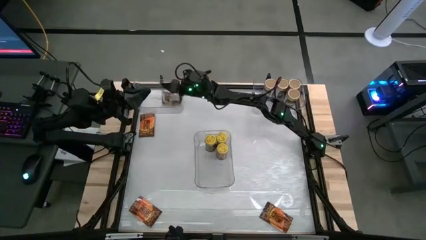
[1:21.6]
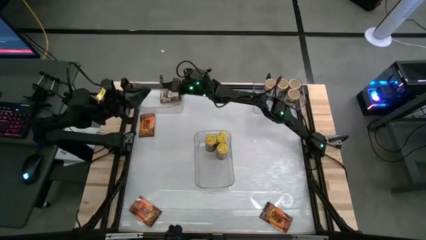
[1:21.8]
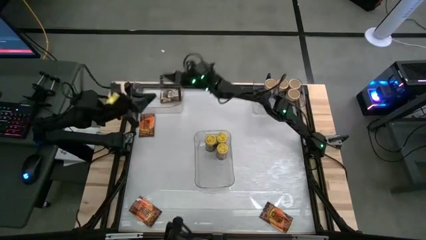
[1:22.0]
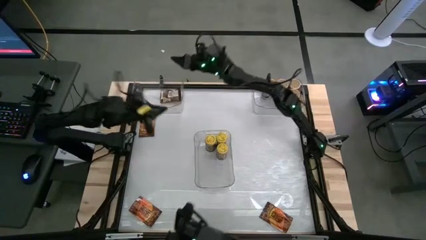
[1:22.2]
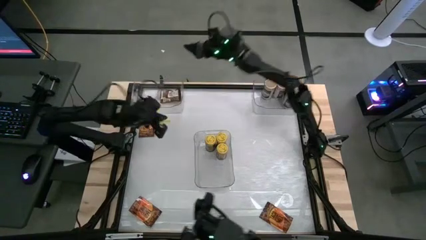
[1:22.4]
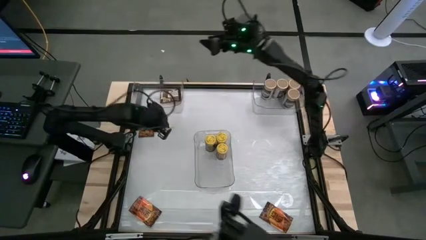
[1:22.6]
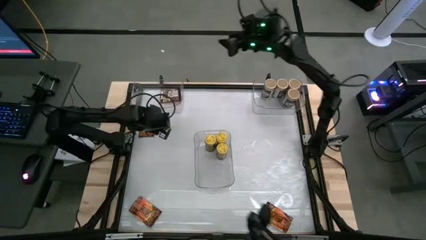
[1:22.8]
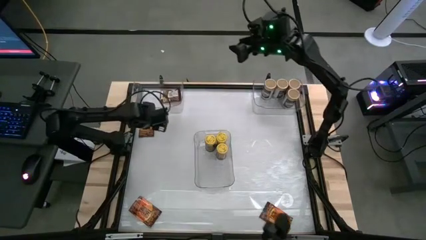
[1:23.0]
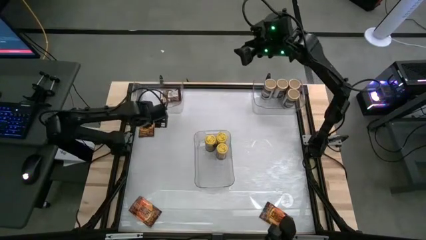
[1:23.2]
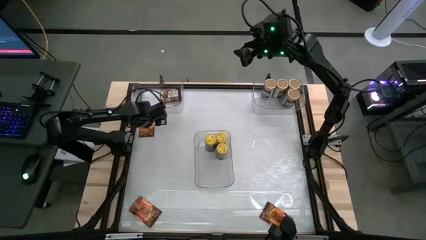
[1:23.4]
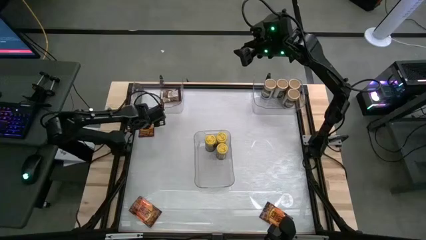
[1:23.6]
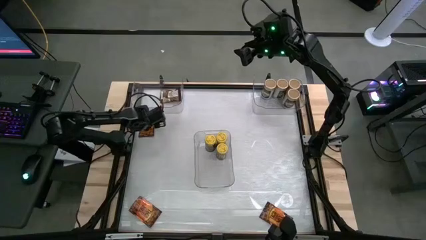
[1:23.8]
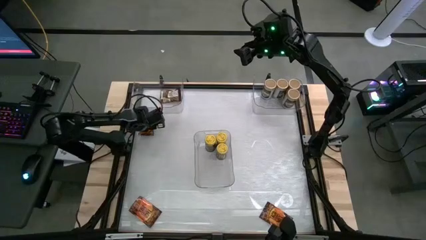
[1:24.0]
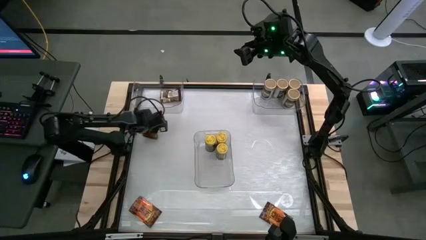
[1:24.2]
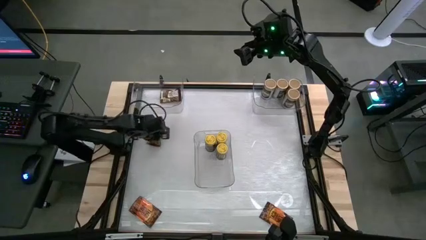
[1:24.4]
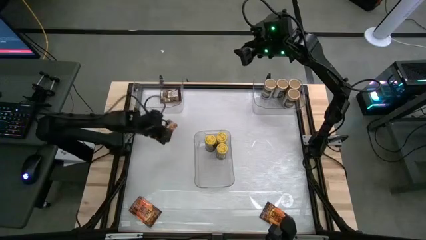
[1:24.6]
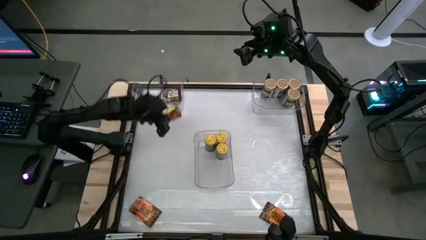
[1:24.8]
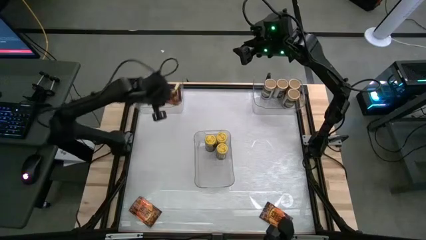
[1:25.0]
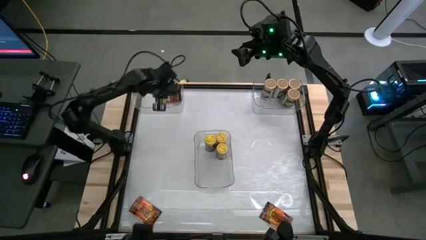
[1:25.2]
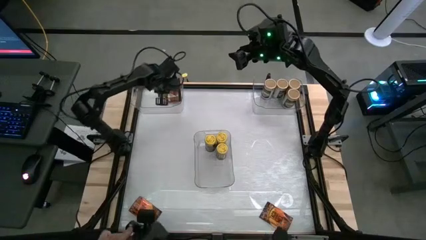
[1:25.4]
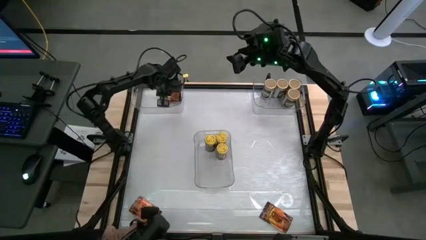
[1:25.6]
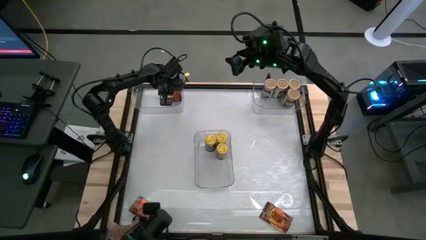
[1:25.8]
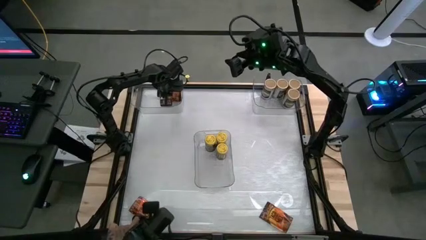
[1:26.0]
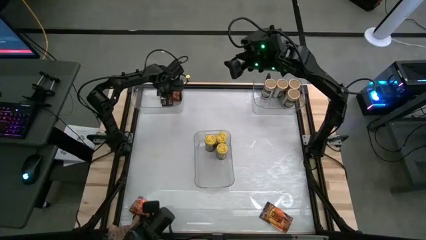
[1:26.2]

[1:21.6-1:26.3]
Task: Sort spices by type
Put the top left brown seasoning bag into the left transparent bin

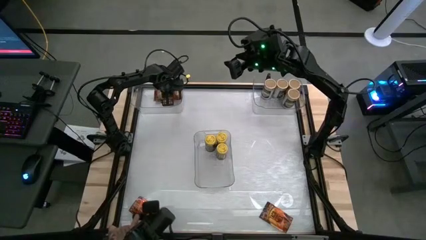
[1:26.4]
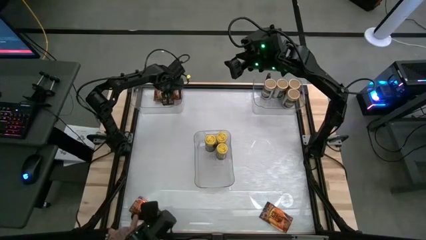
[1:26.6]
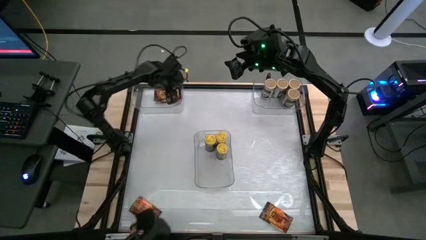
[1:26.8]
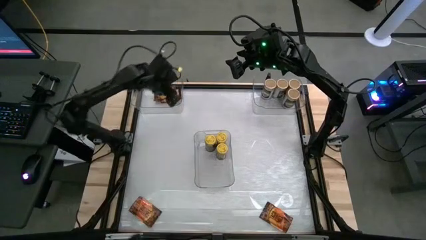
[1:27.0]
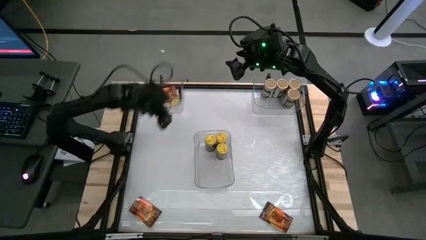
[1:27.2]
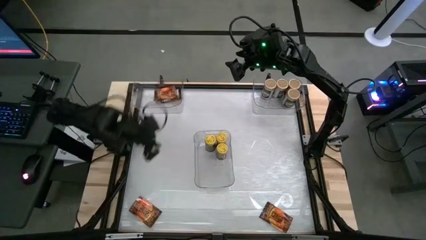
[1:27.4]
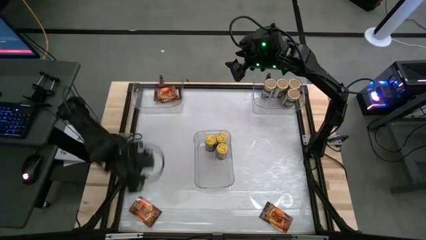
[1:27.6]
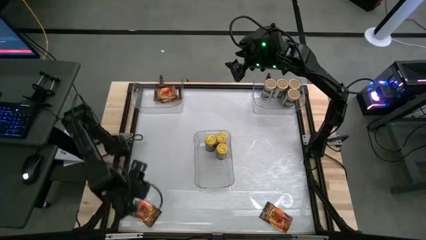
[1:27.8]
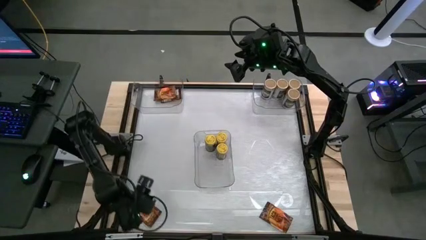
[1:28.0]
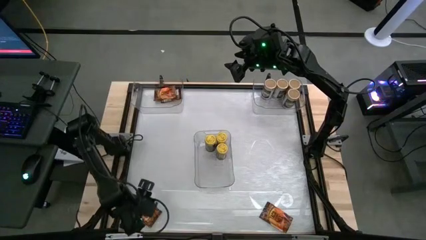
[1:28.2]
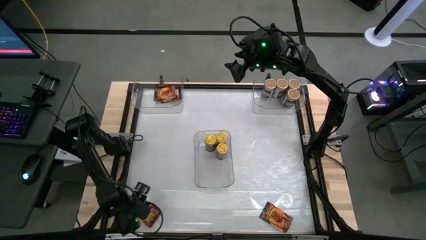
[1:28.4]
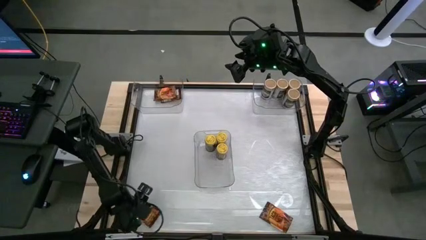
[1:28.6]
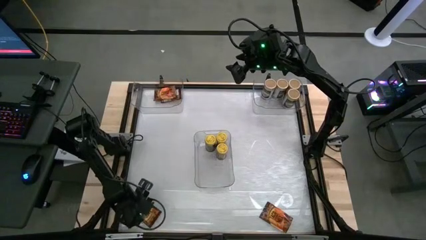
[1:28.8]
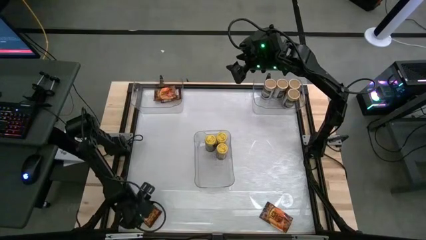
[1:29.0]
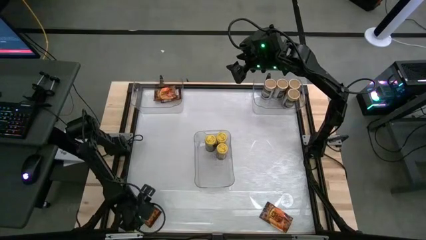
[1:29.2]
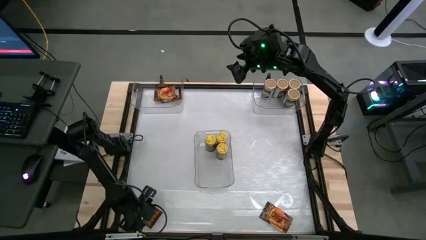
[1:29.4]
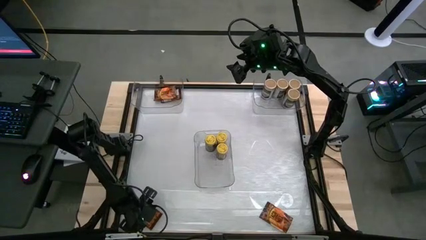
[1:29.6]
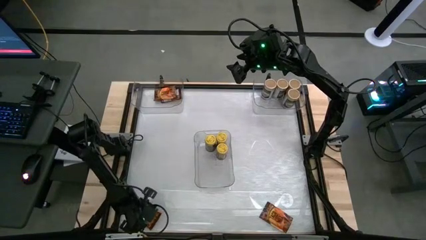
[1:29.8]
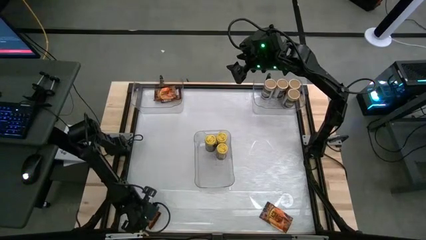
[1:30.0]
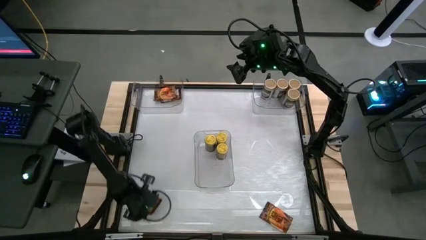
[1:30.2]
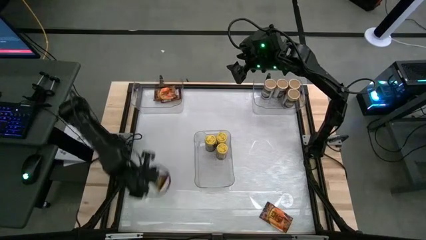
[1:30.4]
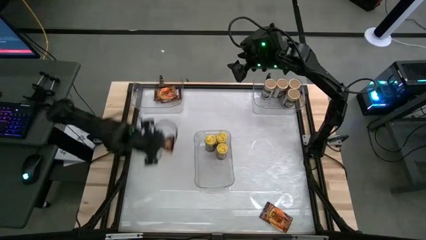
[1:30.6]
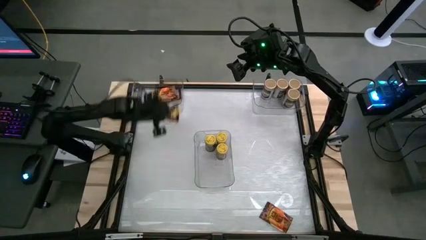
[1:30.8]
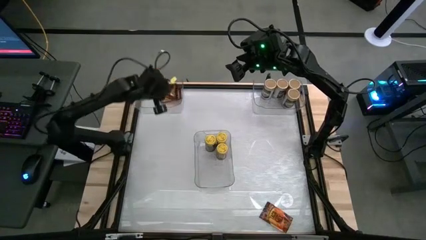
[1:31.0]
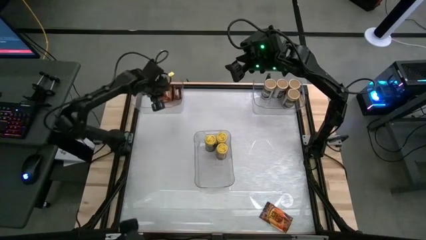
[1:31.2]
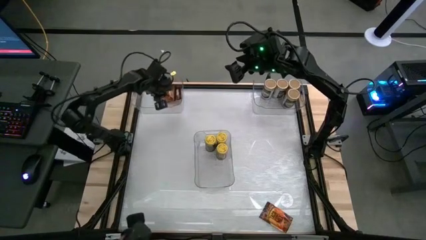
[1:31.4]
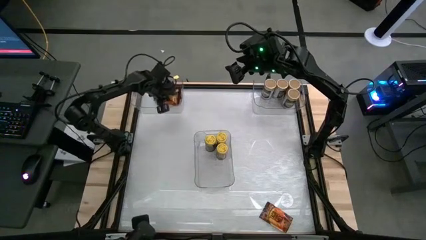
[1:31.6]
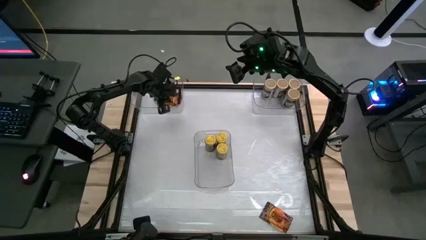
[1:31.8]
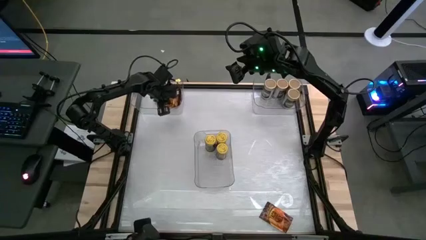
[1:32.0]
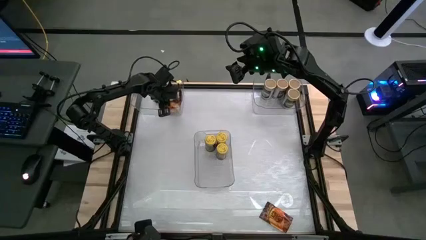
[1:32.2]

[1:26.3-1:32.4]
Put the left brown seasoning bag into the left transparent

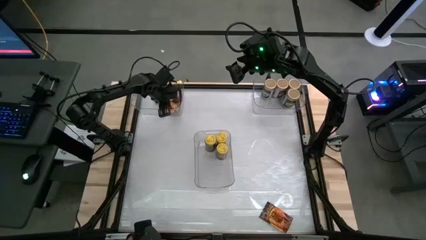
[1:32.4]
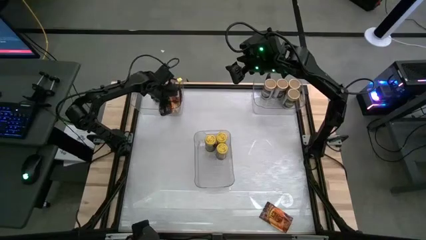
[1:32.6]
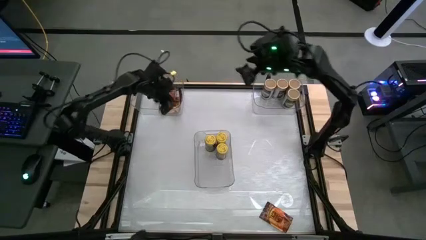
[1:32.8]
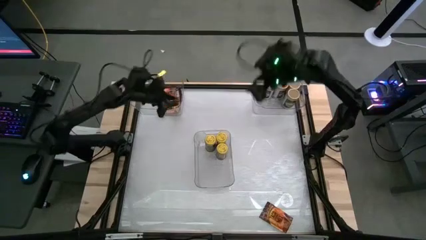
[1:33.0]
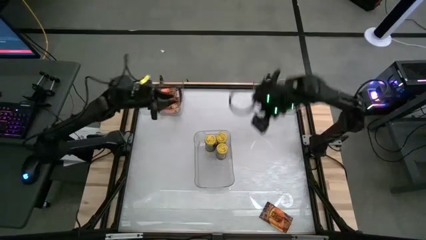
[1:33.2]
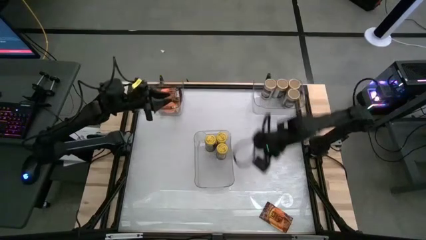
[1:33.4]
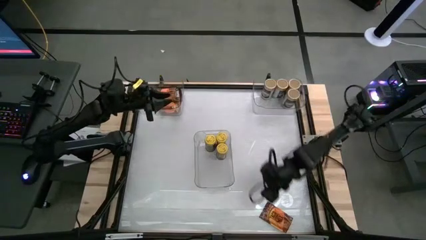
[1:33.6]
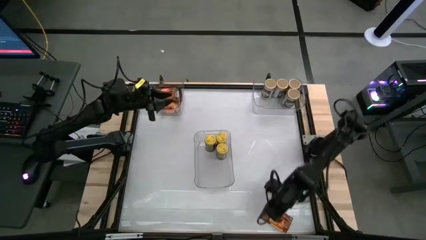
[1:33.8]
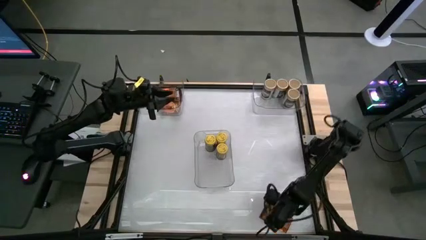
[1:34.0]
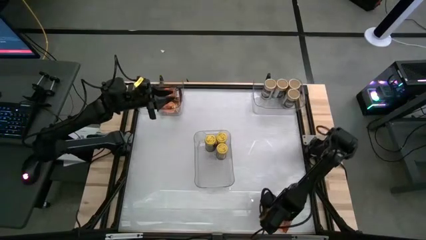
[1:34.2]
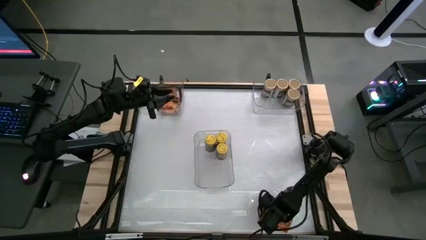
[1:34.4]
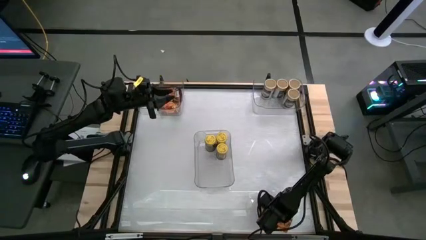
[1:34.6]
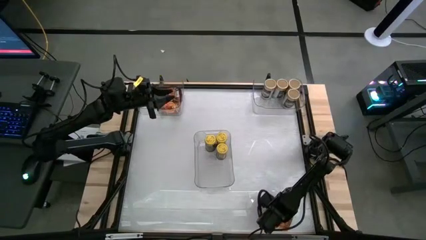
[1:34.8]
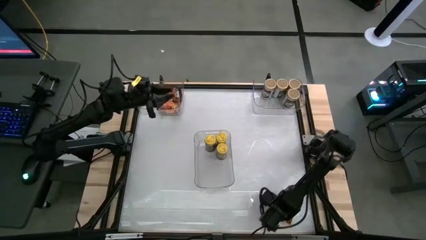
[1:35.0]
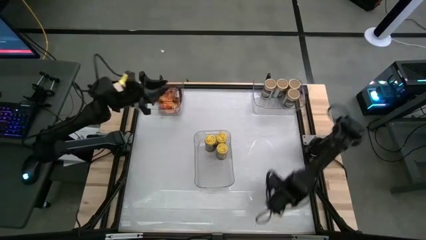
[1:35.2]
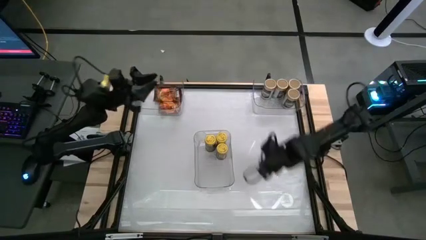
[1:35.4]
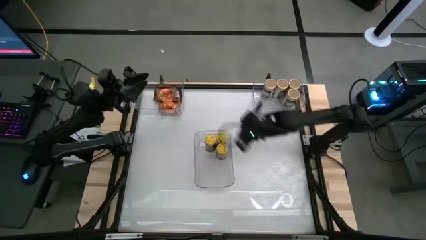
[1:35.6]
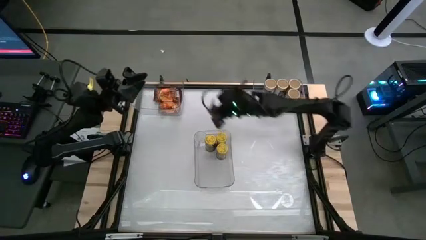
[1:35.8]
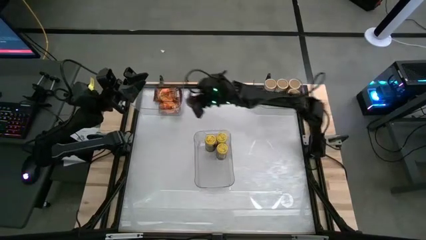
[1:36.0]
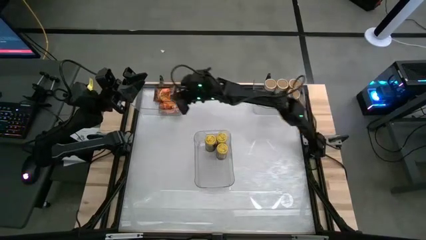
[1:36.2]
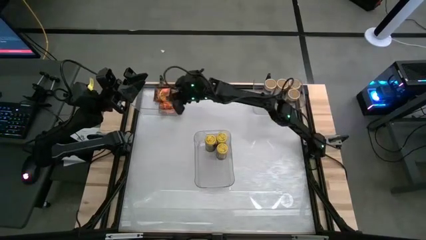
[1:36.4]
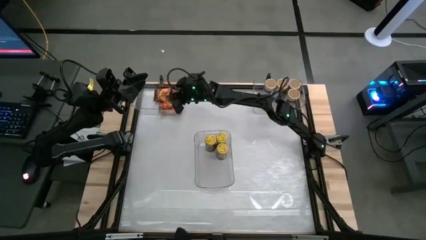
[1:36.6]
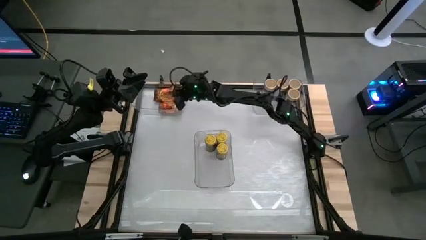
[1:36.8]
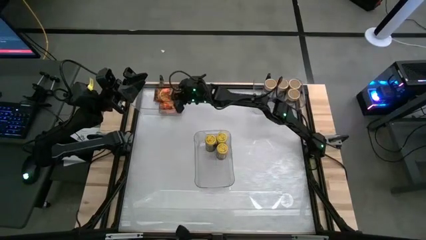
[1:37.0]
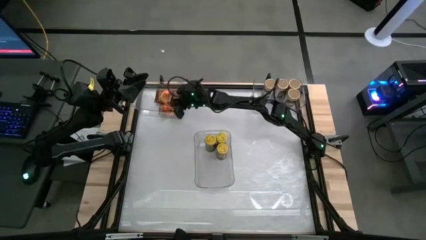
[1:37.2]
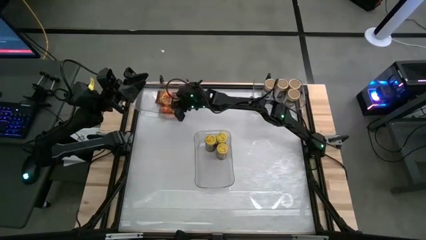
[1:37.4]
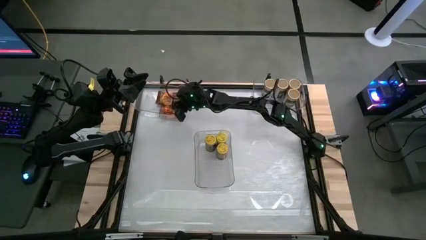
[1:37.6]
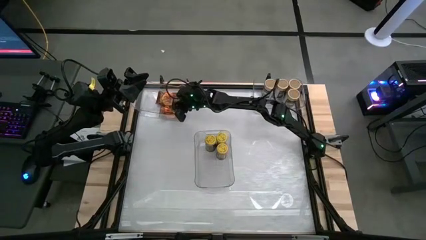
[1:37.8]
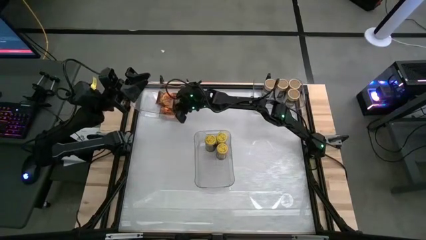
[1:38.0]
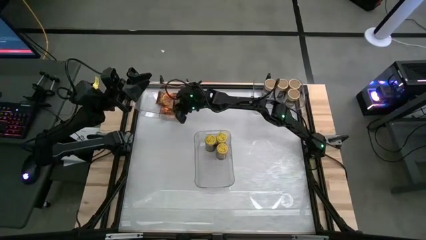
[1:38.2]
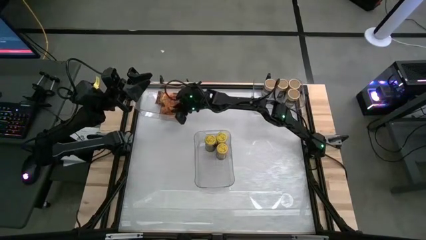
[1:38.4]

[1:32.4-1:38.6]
Put the brown seasoning bag into the left transparent bin
